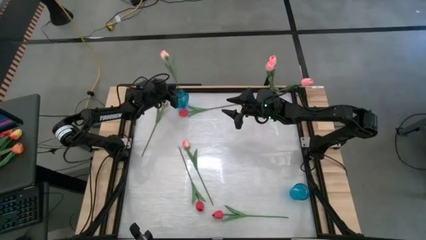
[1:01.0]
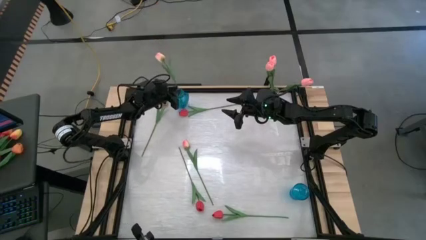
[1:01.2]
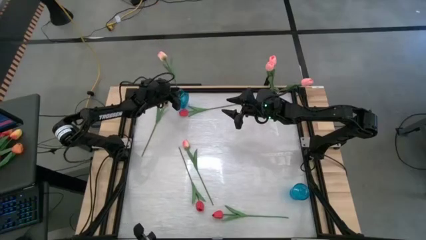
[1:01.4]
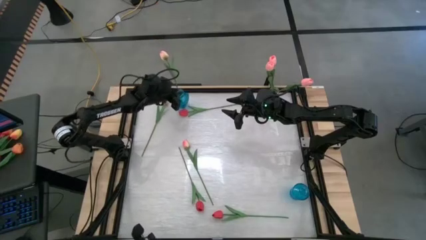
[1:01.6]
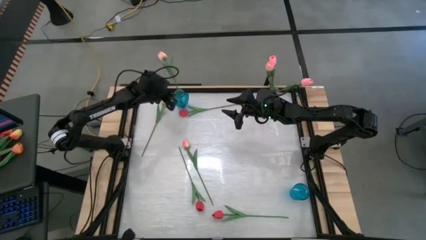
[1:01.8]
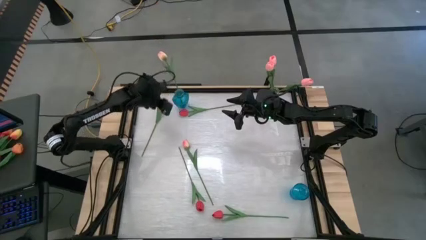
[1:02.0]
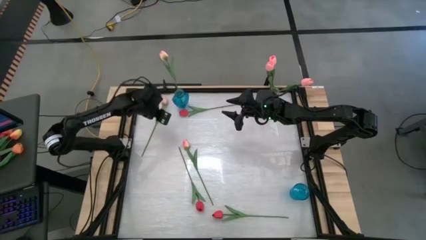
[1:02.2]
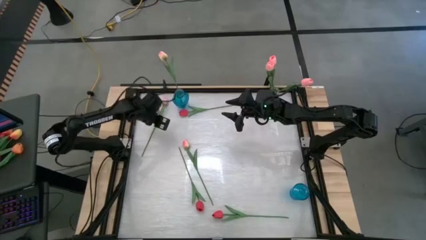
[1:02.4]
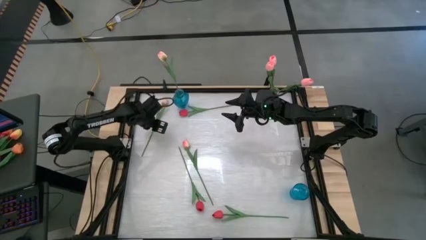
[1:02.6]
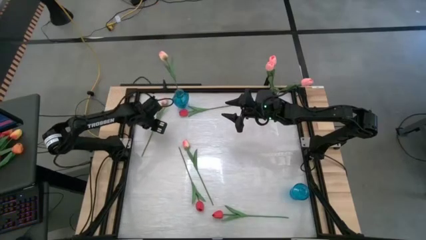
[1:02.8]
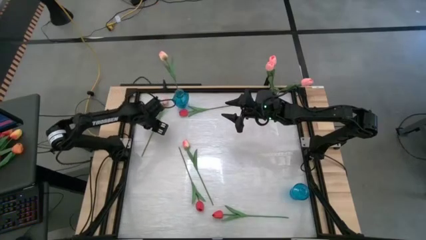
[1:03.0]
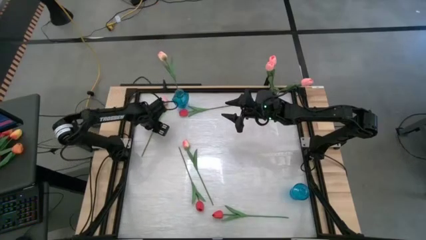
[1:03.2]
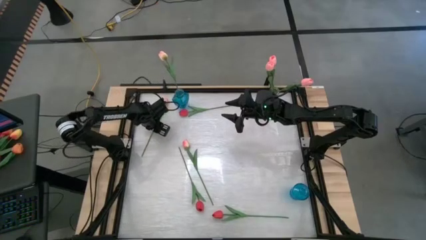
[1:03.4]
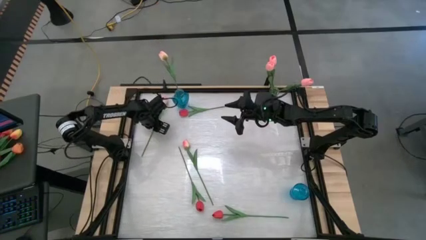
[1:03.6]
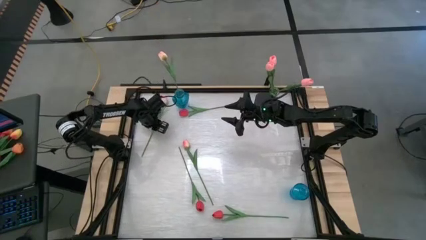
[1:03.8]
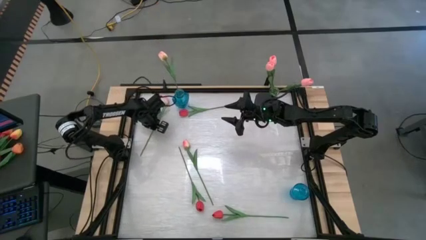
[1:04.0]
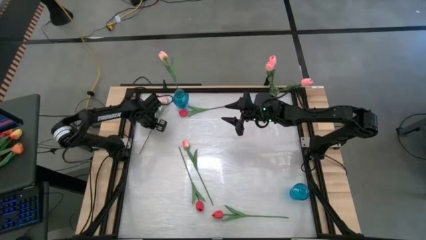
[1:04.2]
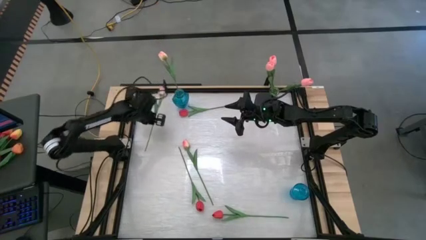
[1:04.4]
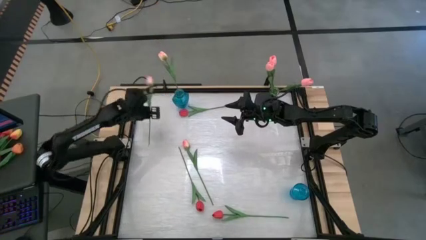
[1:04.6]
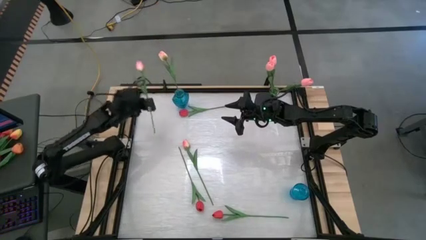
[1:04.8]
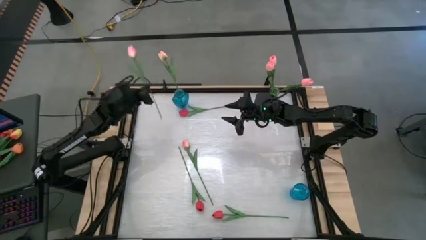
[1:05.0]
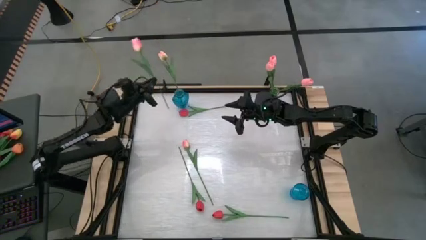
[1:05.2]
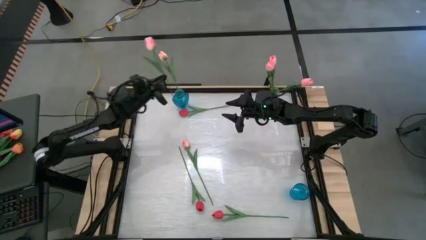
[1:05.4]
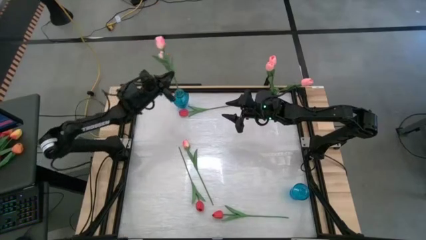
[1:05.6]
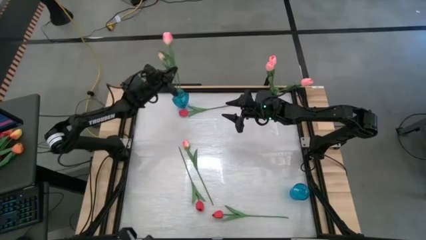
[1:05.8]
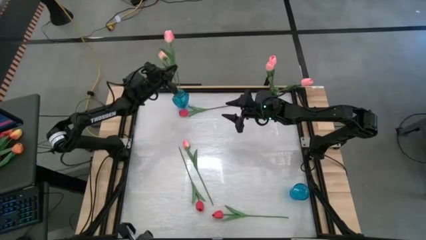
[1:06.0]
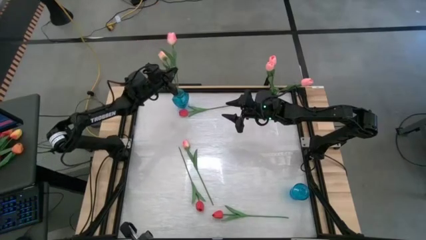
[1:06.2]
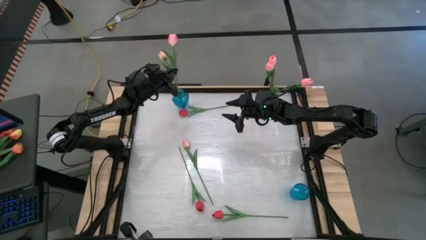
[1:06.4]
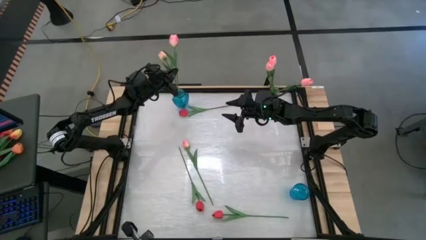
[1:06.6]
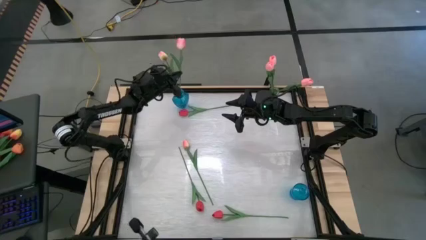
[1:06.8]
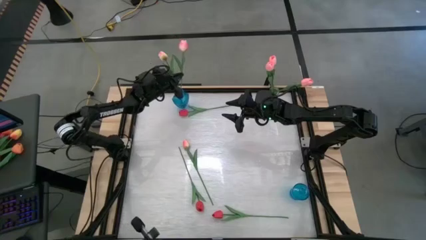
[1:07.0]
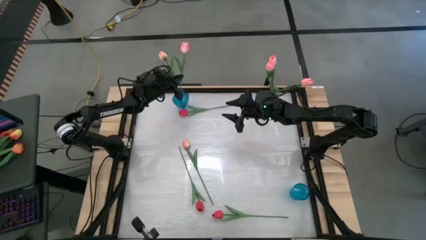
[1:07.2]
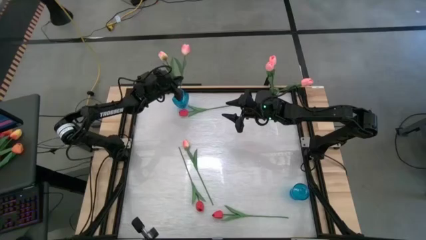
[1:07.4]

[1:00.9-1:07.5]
Task: Sort flowers into vase by color
Put the top light pink flower into the top blue vase

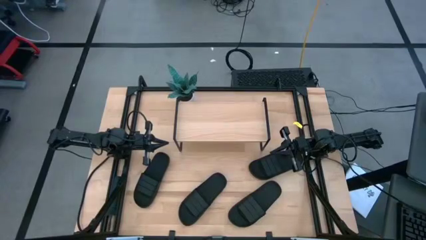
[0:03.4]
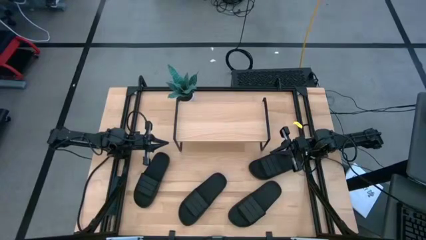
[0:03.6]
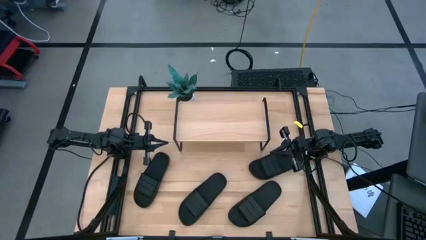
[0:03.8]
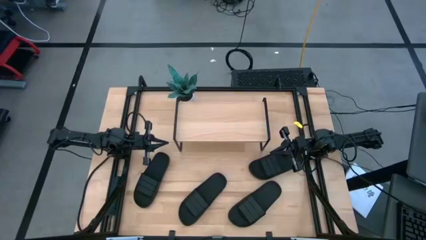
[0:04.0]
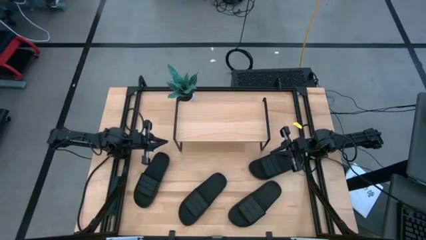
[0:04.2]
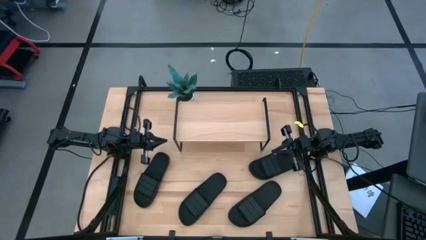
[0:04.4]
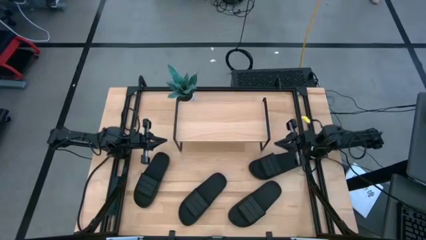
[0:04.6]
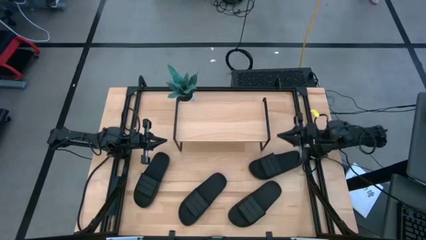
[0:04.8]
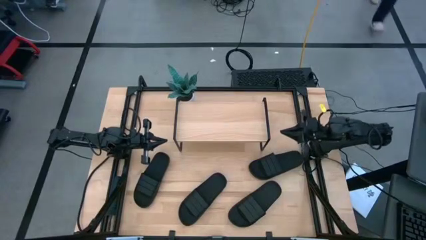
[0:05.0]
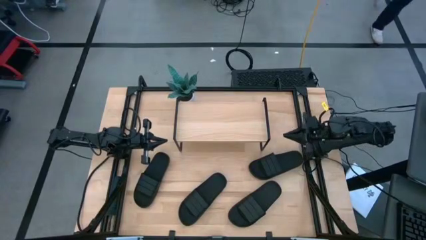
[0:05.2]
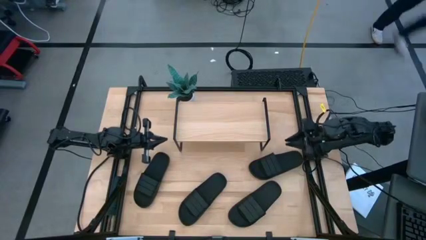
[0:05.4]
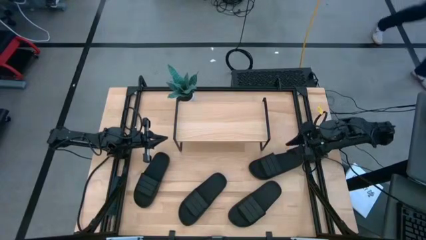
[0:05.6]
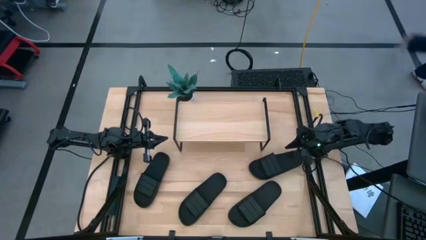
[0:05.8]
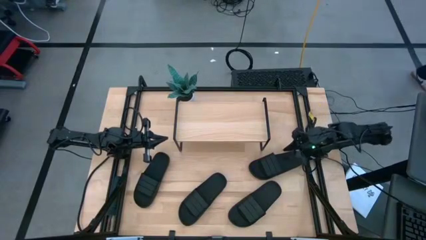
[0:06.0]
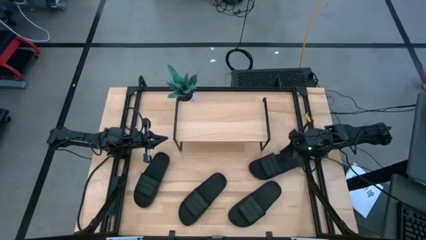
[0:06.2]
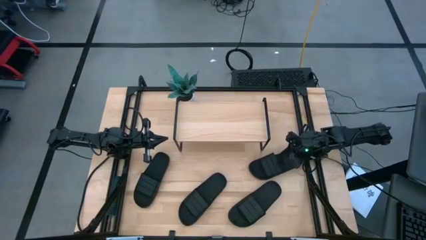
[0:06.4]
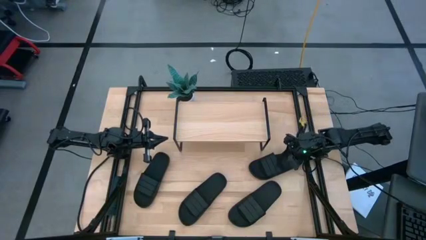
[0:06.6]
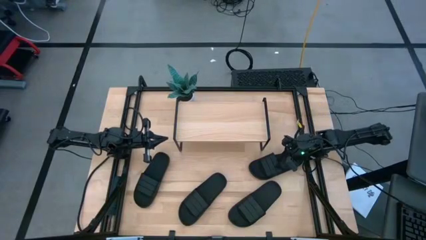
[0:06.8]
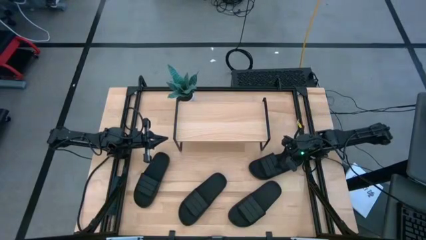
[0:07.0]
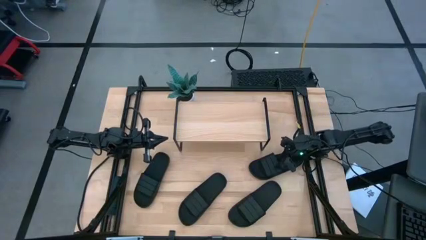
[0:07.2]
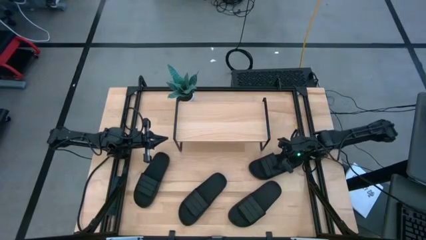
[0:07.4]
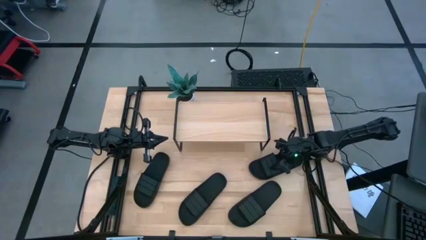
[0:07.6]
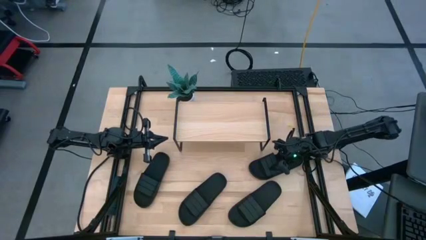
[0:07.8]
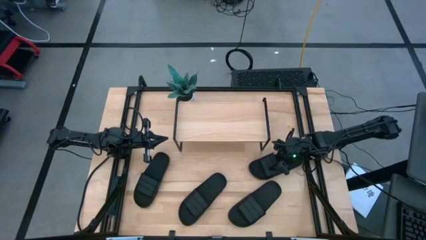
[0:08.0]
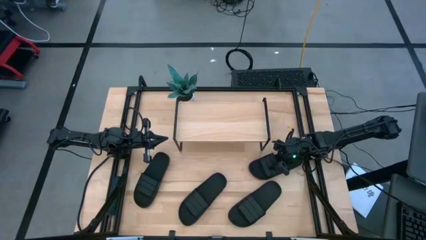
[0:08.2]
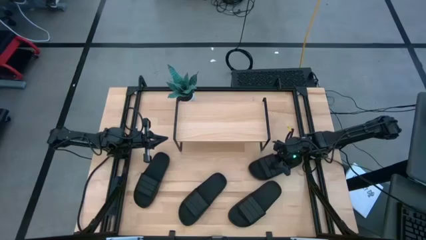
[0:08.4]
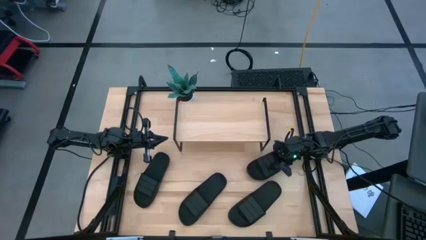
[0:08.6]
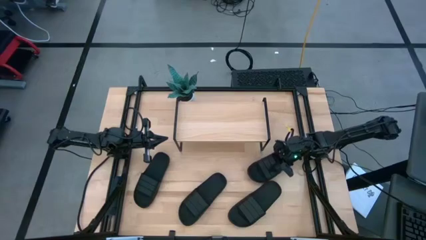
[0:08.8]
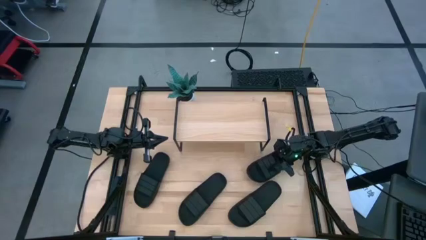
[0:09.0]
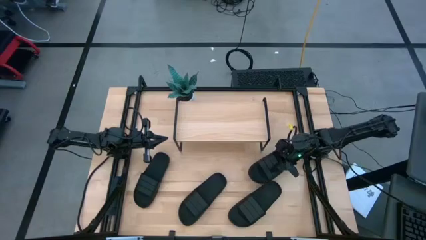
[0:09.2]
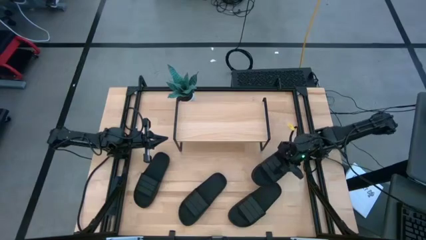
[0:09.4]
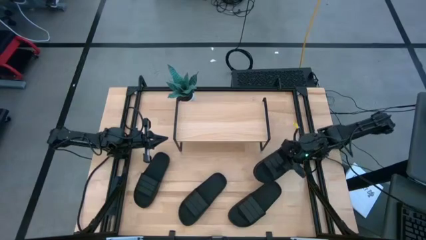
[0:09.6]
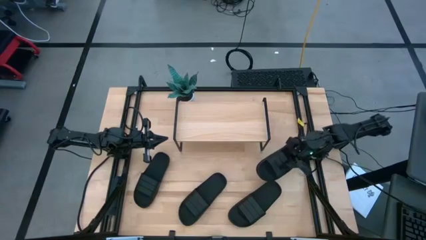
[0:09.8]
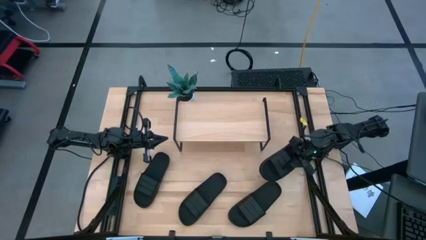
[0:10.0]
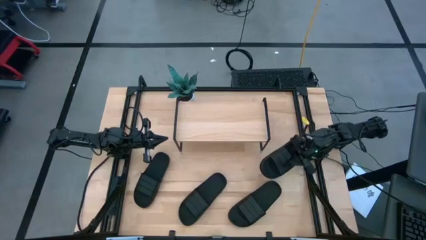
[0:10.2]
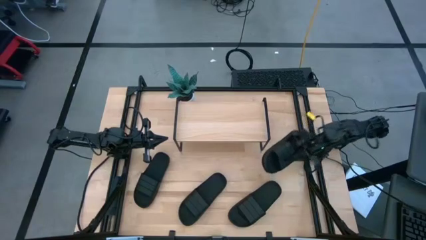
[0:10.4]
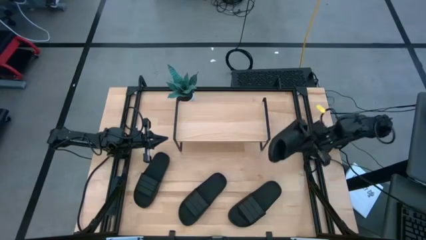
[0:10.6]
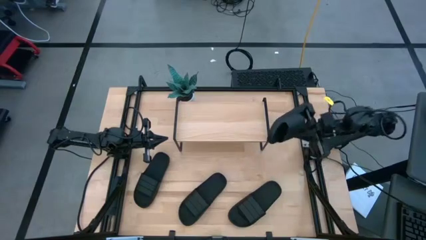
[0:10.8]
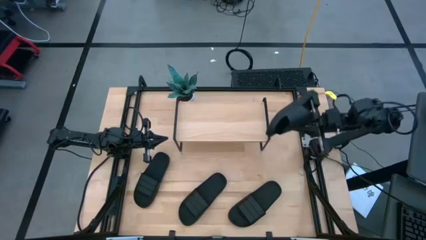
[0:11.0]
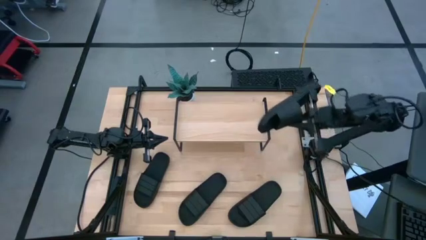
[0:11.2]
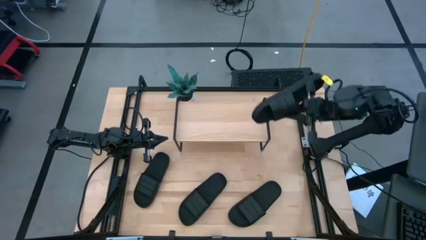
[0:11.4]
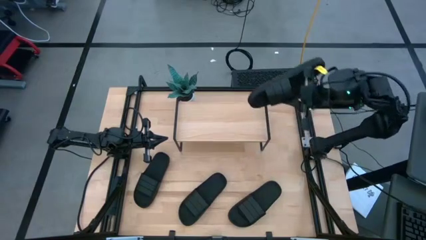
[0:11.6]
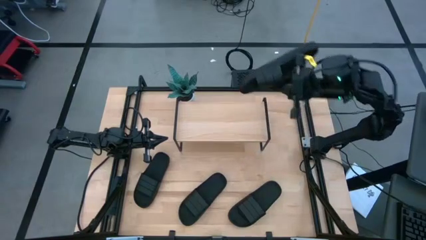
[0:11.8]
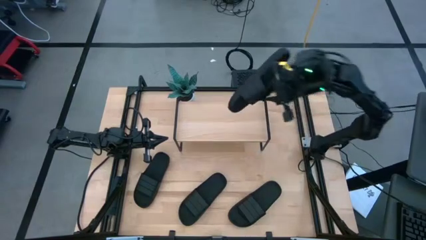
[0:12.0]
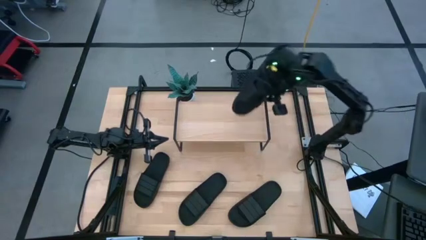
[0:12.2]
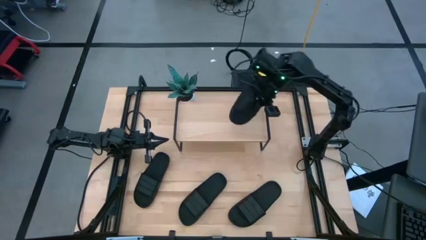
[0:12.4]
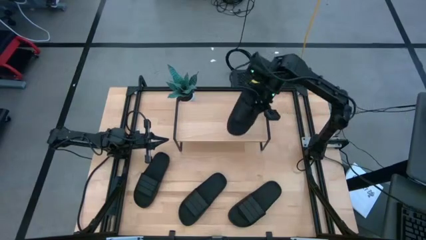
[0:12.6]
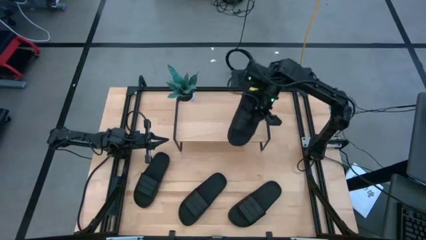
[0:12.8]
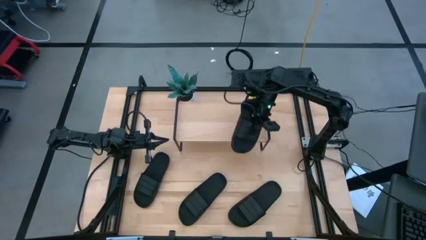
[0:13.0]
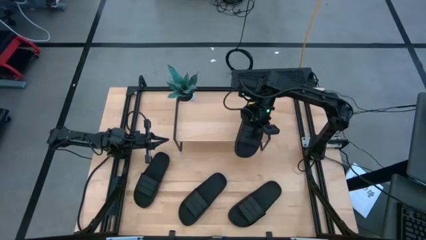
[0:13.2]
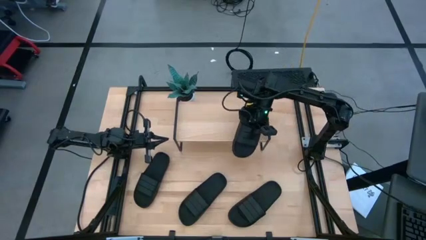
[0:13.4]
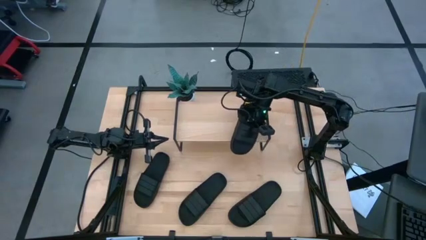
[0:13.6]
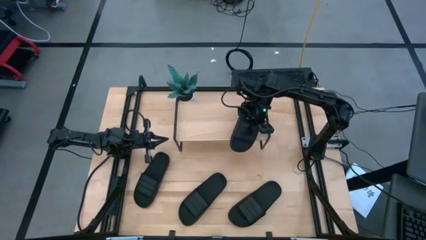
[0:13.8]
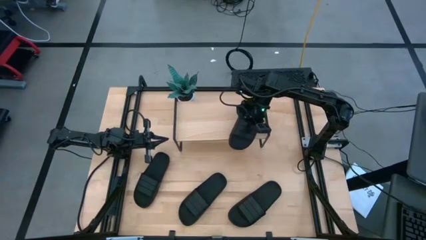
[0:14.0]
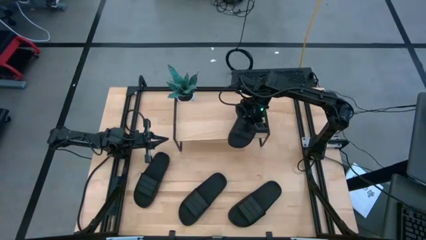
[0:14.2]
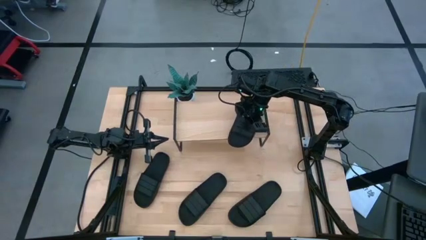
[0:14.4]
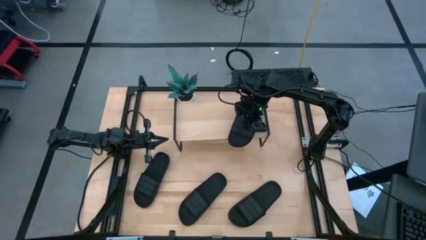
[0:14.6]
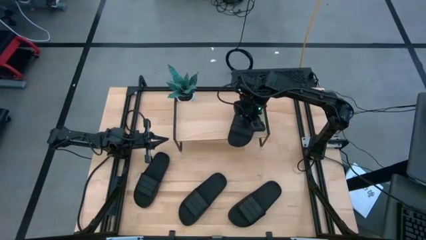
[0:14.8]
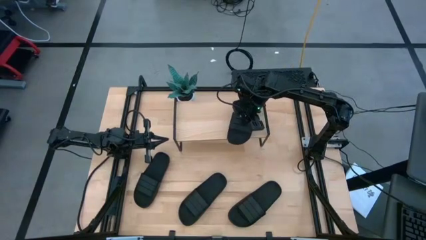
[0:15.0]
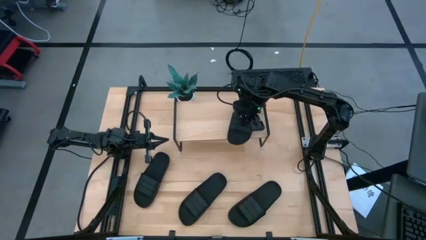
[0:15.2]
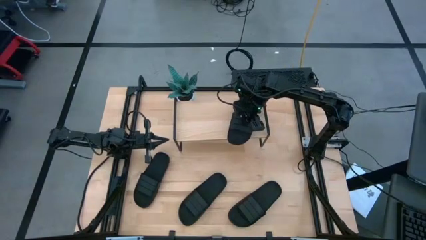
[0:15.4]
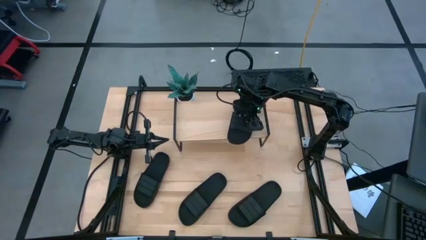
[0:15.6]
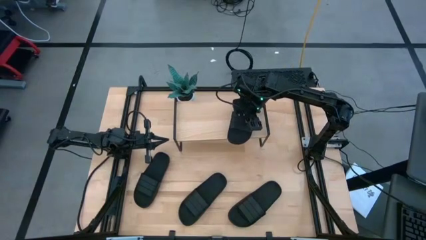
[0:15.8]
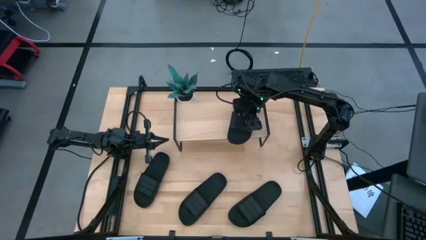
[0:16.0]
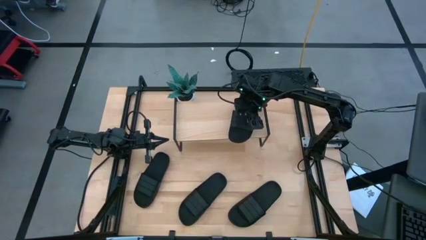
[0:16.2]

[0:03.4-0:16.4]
Task: Pick and place slides into the shelf
Put the slide on the shelf
